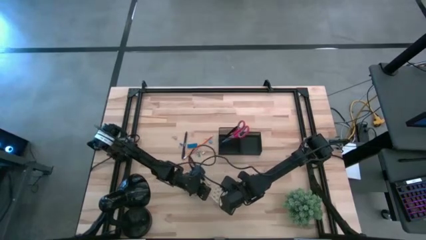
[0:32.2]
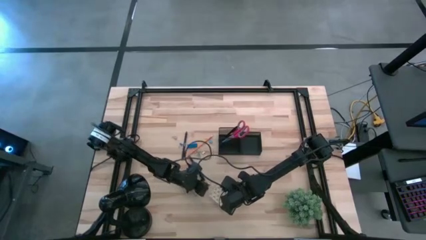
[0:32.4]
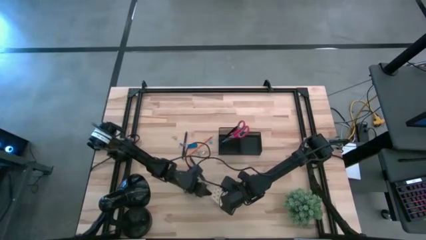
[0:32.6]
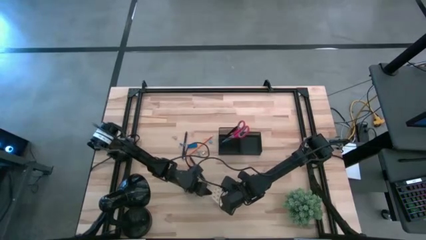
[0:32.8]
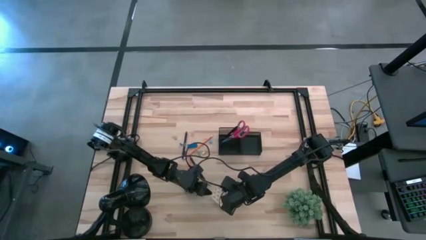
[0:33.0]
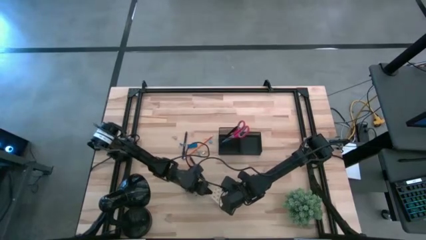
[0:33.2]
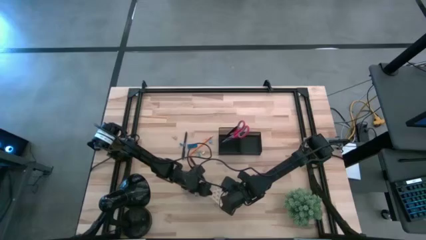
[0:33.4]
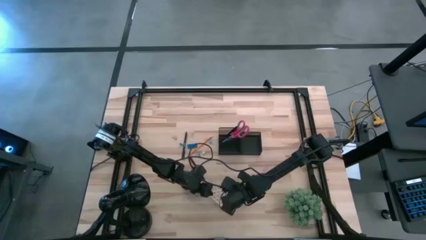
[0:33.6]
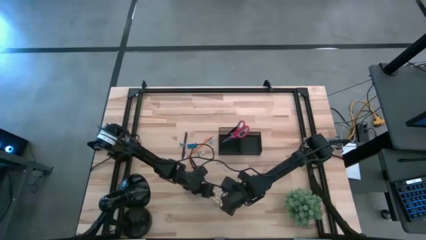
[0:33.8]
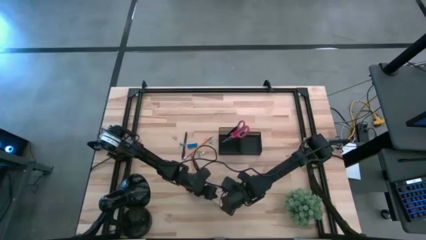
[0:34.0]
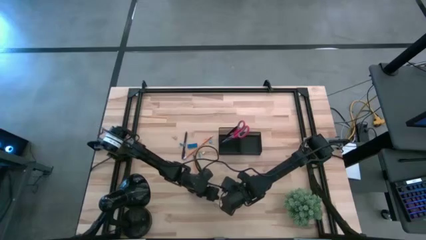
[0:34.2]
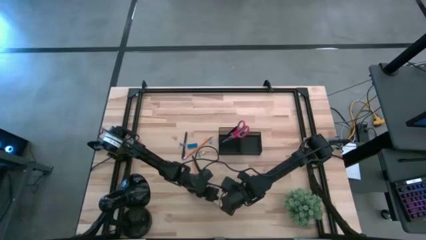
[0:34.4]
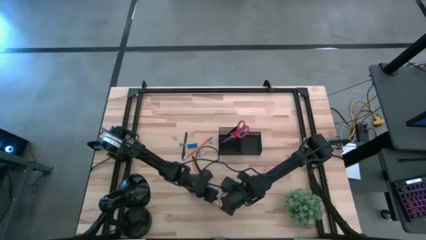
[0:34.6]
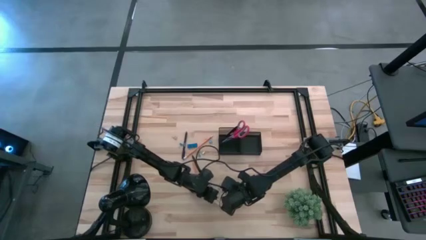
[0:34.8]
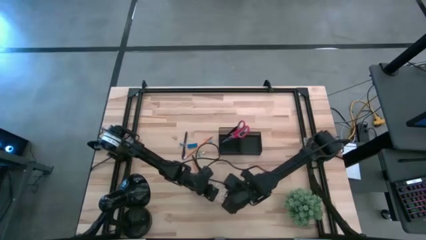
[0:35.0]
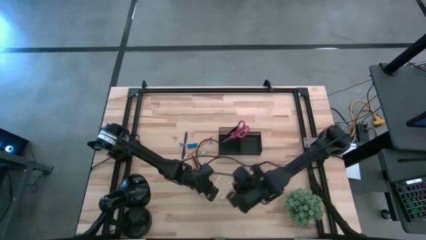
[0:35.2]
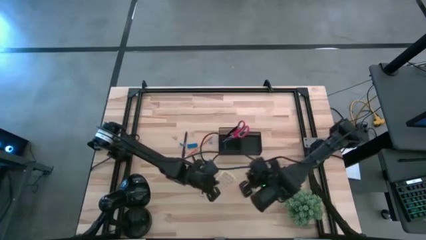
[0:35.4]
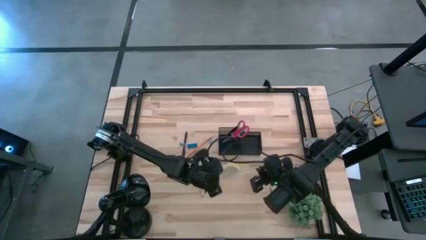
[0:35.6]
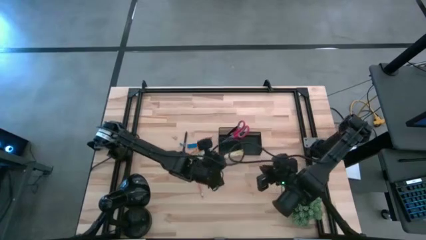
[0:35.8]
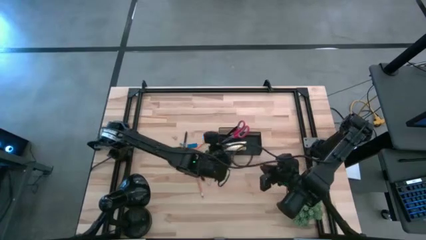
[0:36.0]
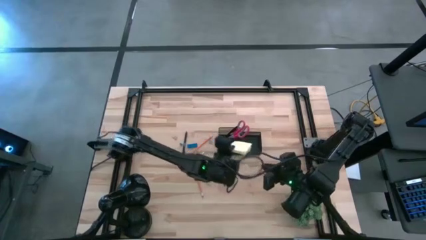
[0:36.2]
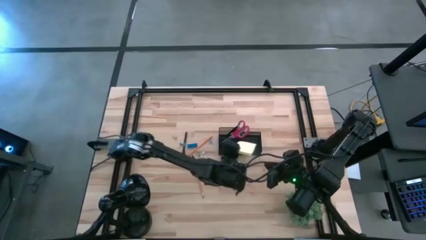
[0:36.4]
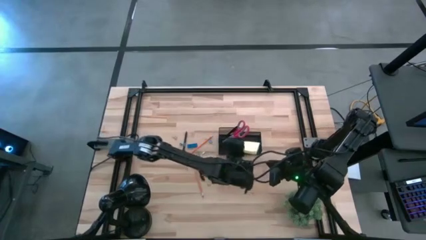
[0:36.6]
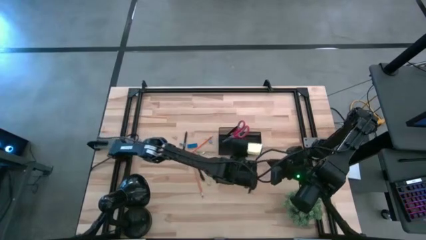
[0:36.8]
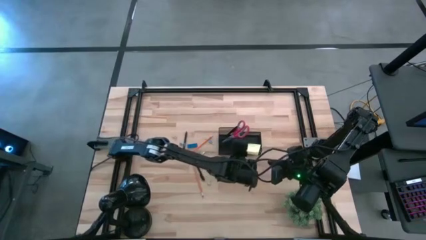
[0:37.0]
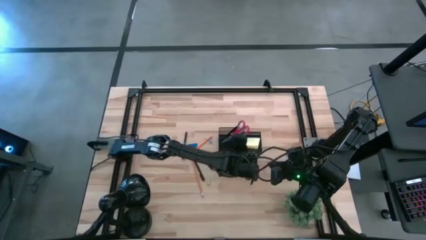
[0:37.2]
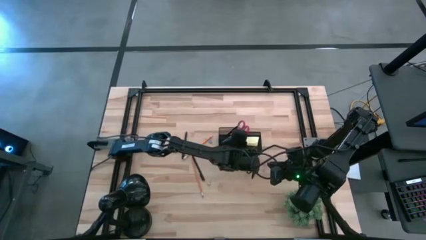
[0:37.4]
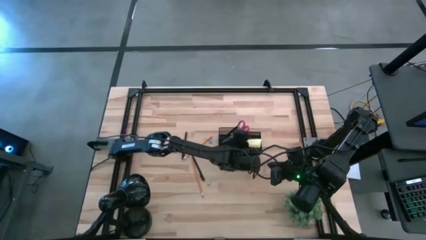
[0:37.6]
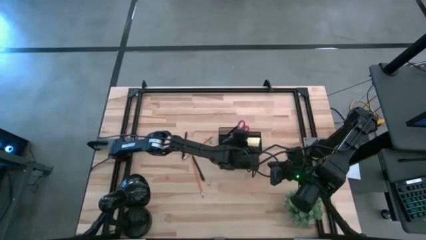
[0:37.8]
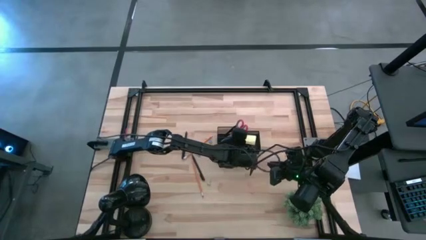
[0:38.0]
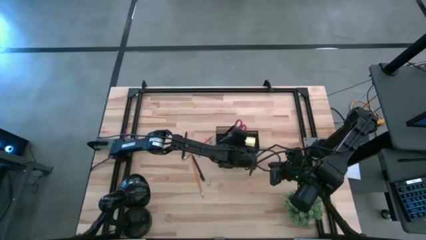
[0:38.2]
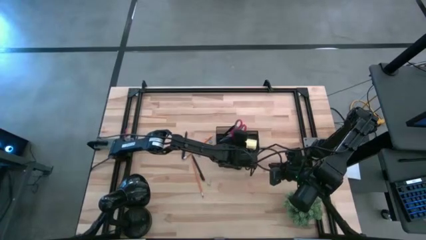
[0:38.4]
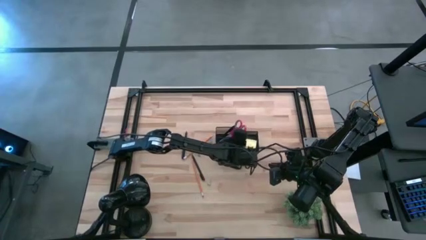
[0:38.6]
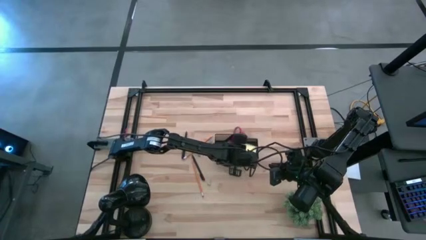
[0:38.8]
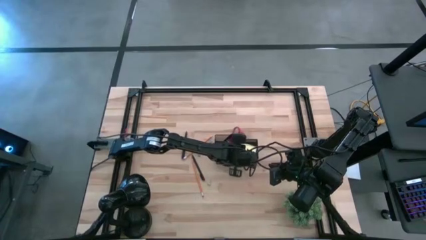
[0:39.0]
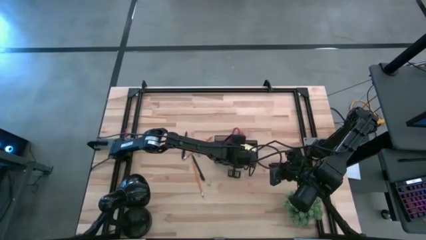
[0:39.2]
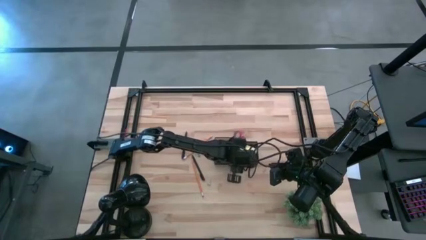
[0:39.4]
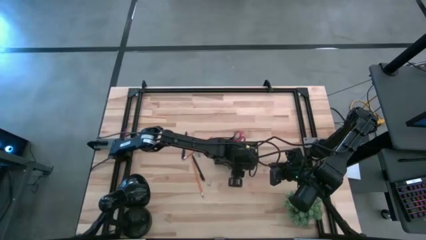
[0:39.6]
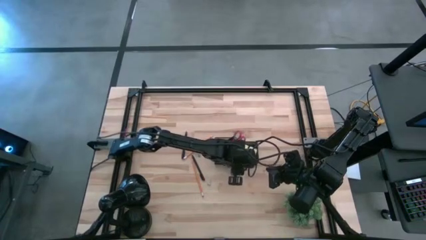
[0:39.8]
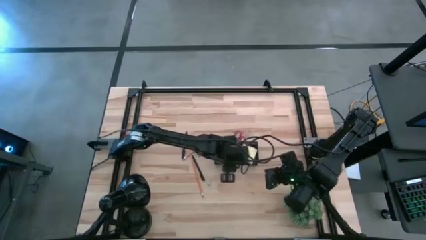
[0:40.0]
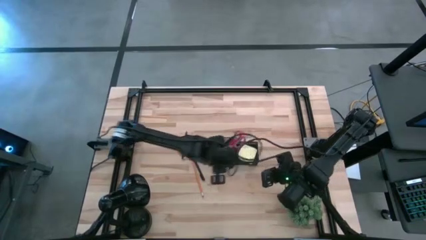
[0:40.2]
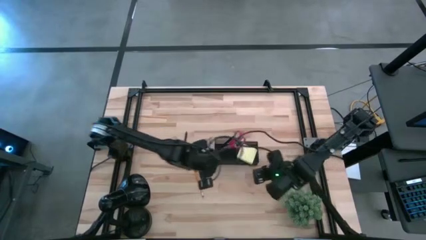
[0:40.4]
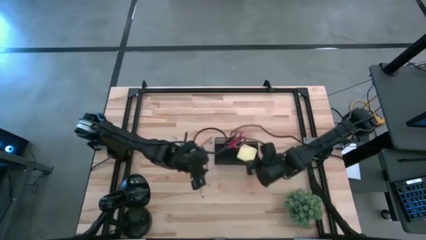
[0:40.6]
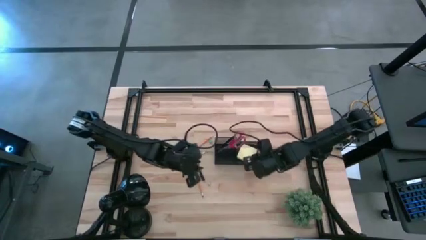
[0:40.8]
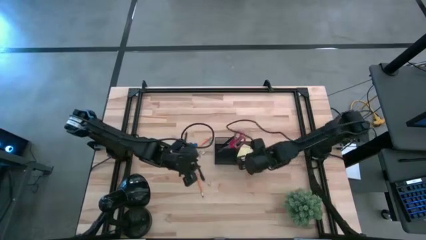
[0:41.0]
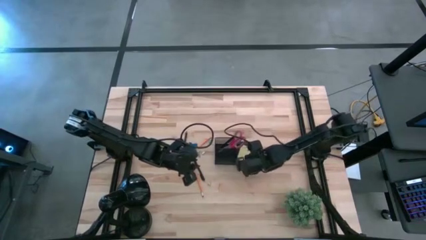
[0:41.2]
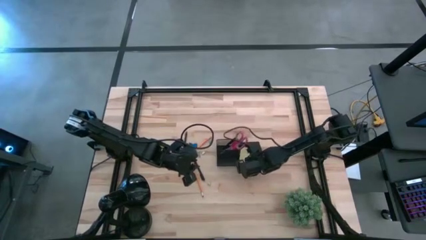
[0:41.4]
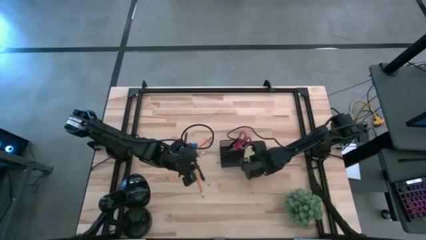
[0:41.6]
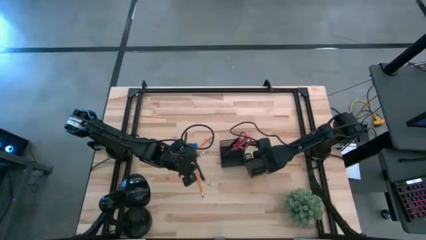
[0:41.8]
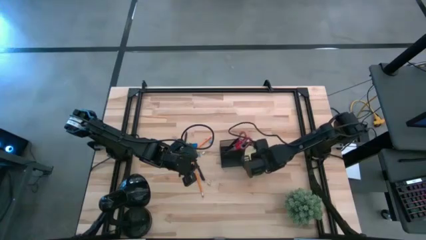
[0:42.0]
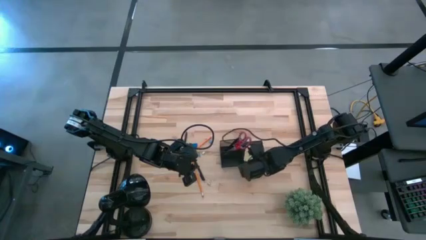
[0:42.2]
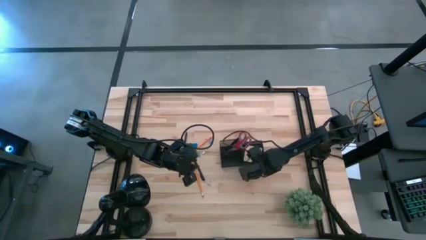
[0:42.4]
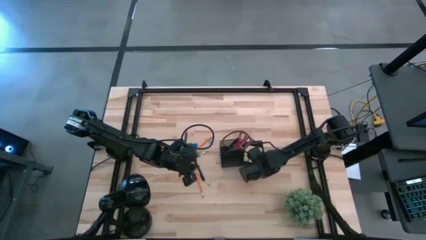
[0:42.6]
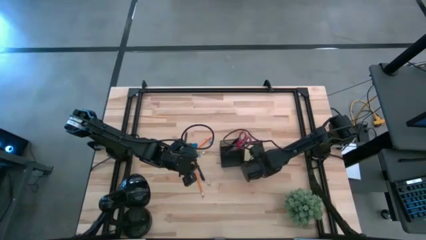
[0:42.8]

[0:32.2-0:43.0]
Task: Pick and place office supplies into organizer
Put the sticky note into the desk organizer

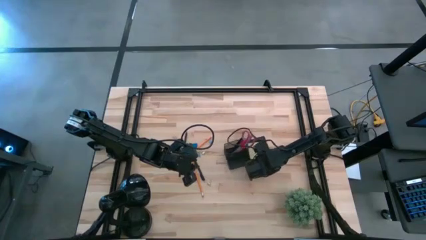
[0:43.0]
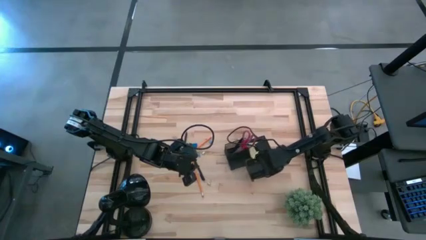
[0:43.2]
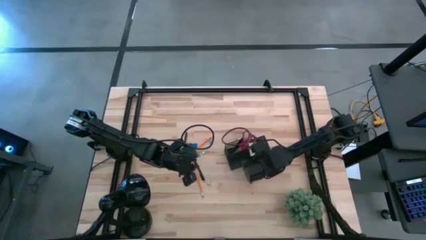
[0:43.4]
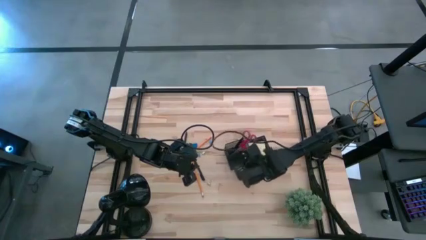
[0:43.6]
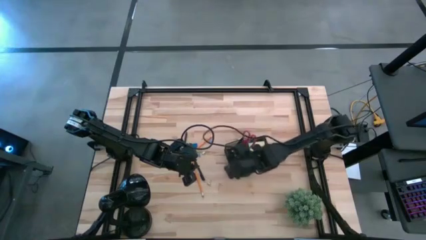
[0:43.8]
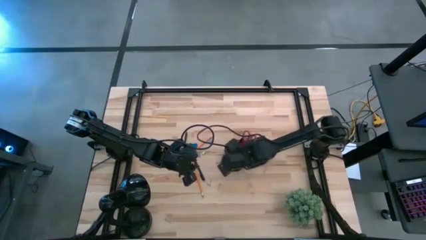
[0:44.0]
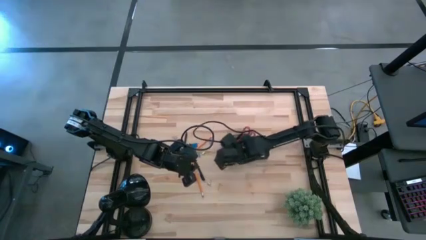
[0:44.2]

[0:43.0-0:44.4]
Adjust the desk organizer

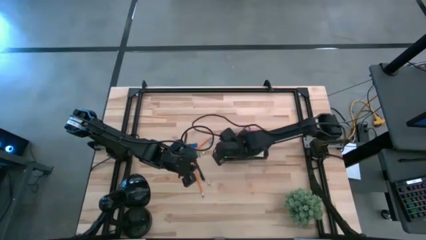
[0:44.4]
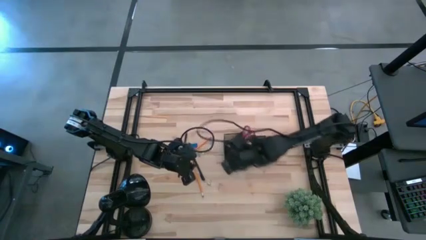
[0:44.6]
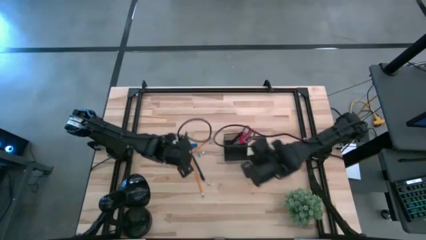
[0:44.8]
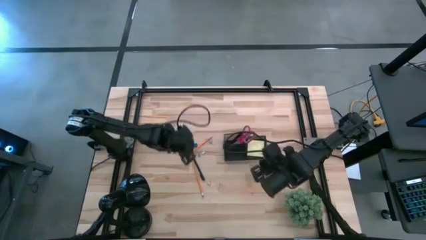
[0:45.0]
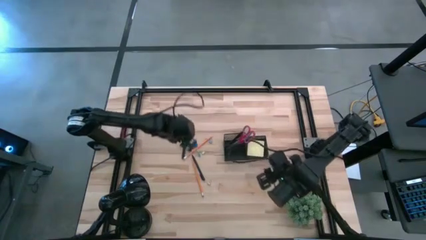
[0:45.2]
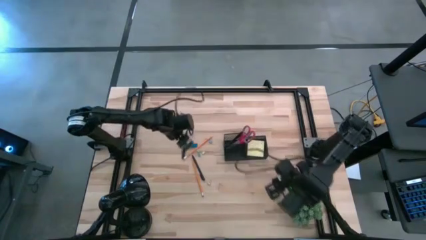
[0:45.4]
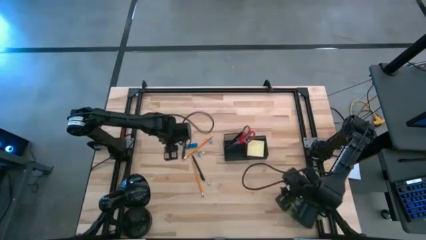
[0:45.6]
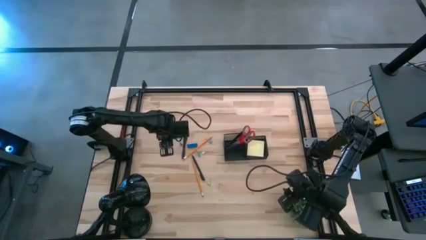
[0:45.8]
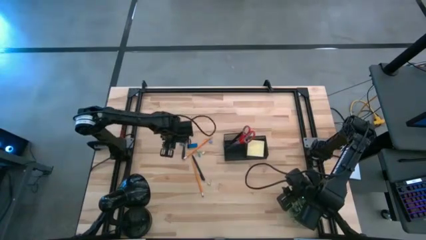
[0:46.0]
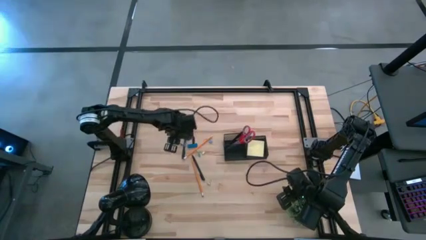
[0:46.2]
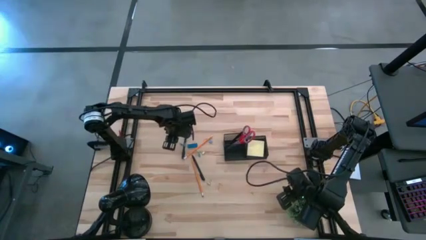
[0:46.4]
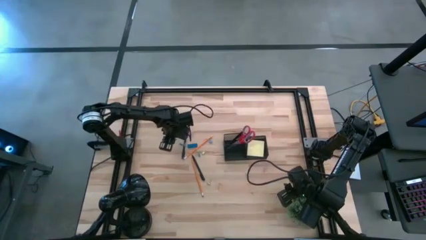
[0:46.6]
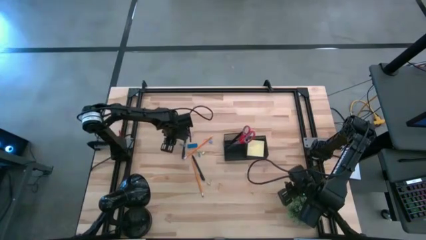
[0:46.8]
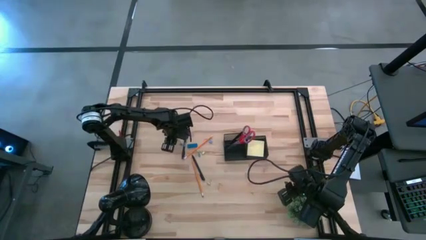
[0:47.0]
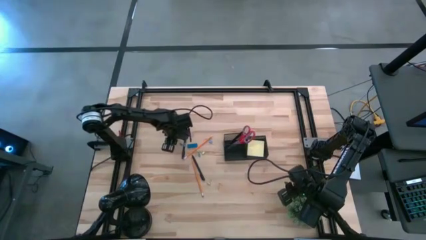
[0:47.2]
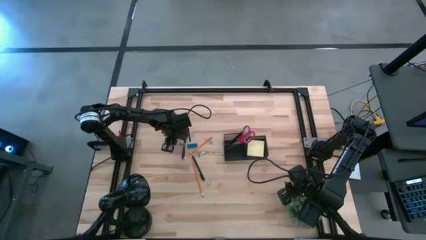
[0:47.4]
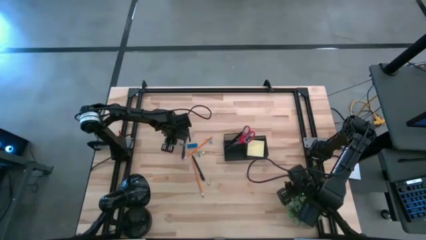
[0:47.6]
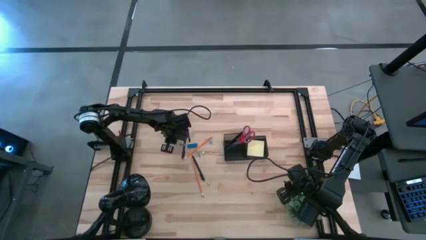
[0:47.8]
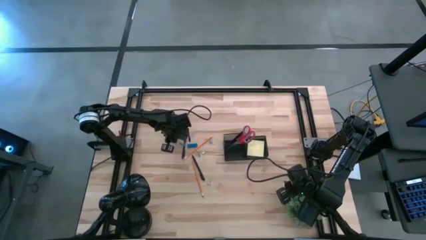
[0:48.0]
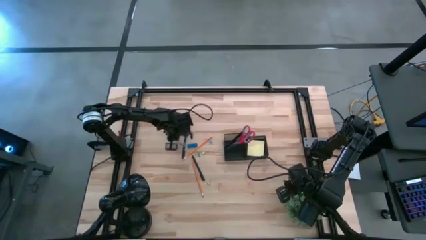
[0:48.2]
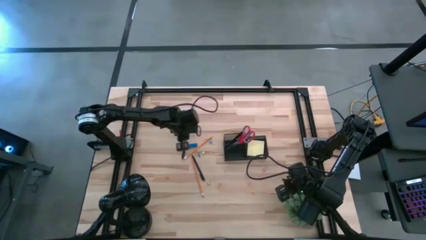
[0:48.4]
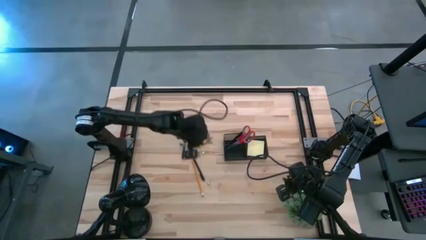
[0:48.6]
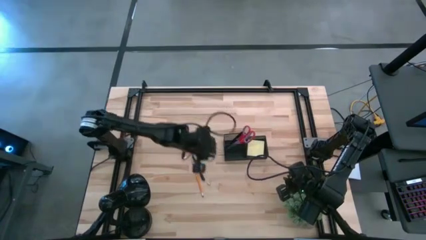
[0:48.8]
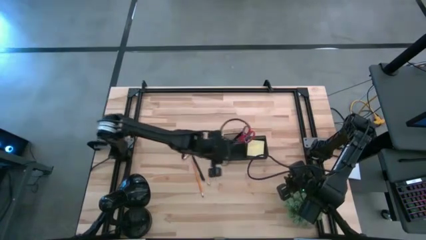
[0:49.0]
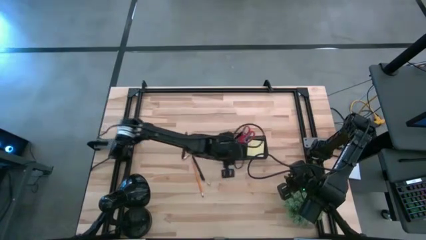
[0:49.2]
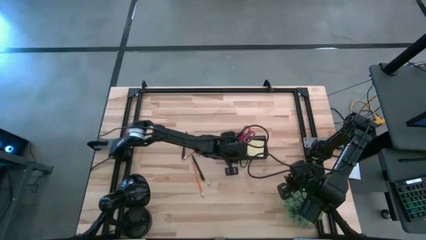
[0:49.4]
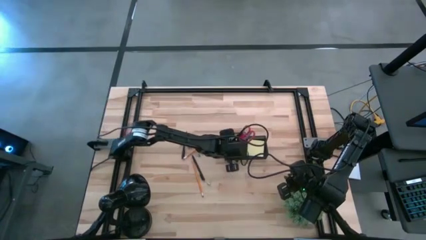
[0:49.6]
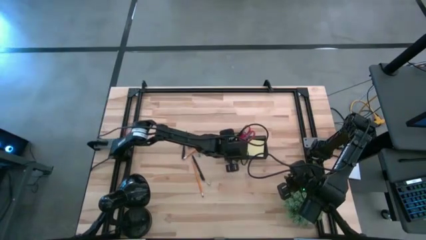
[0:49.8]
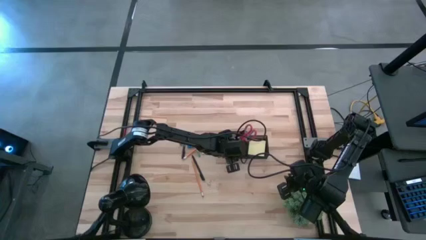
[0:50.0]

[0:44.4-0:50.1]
Put the pink binder clip into the desk organizer
